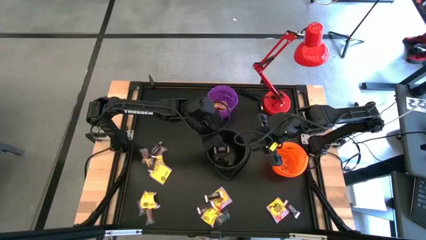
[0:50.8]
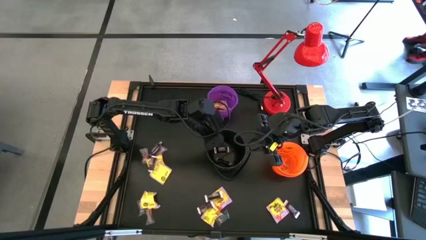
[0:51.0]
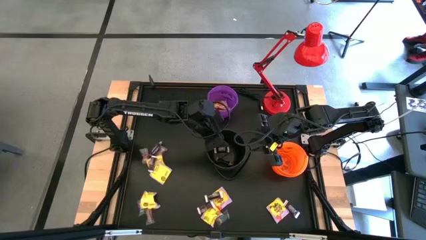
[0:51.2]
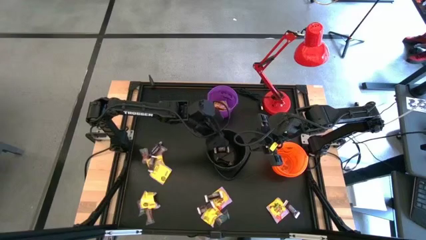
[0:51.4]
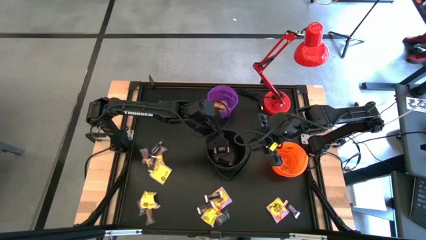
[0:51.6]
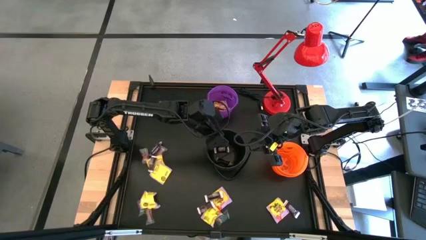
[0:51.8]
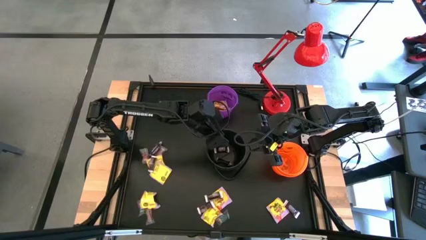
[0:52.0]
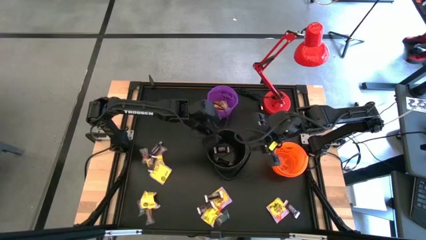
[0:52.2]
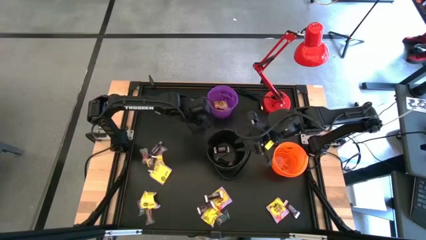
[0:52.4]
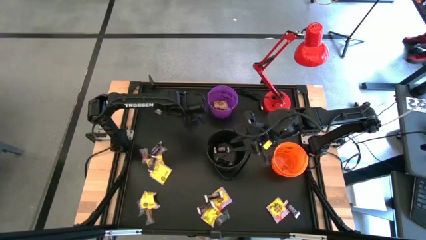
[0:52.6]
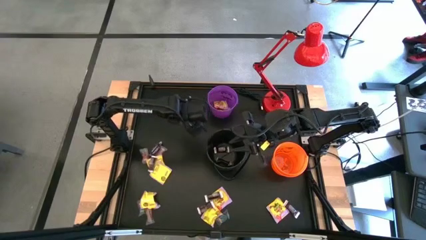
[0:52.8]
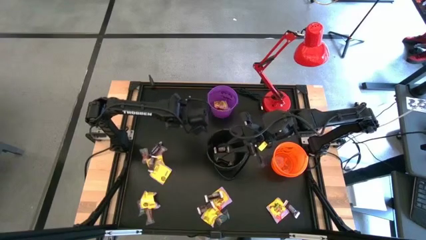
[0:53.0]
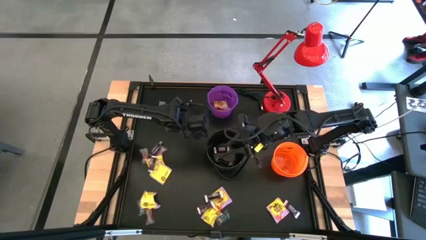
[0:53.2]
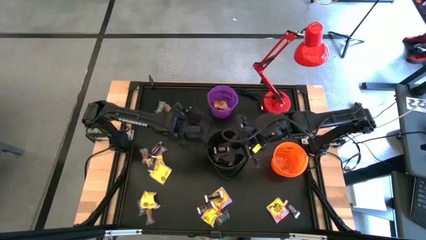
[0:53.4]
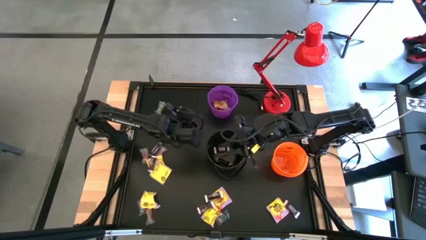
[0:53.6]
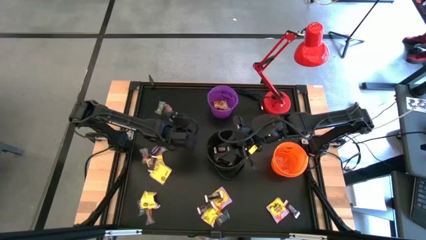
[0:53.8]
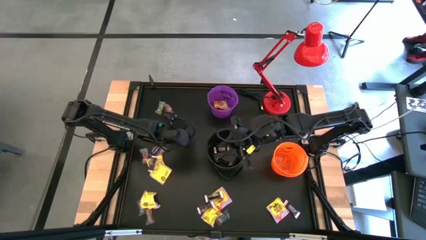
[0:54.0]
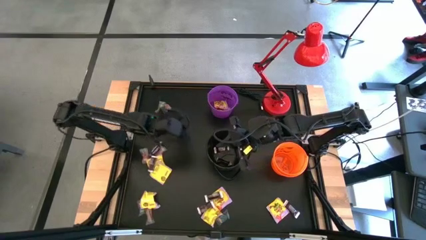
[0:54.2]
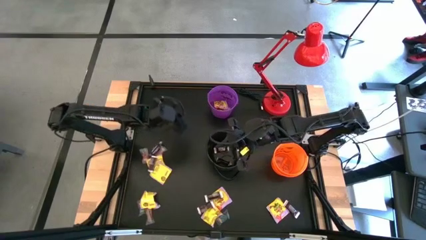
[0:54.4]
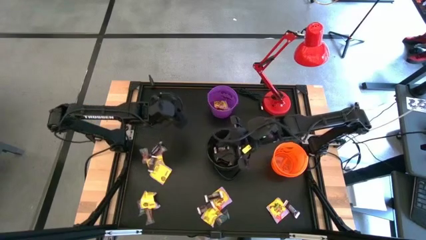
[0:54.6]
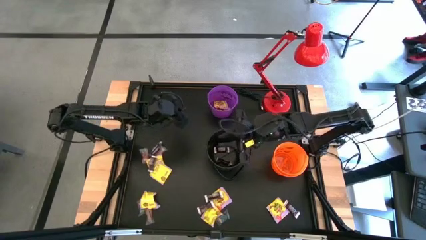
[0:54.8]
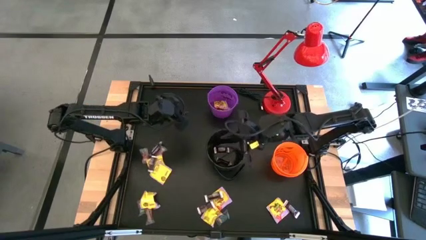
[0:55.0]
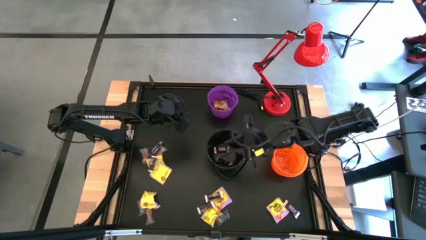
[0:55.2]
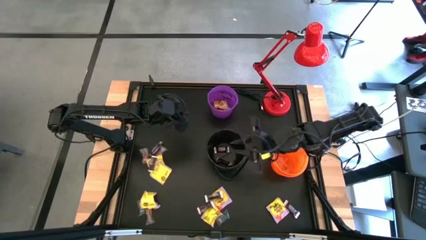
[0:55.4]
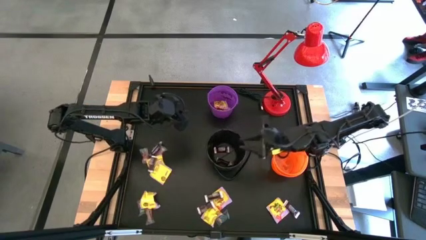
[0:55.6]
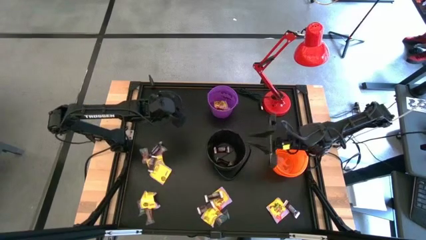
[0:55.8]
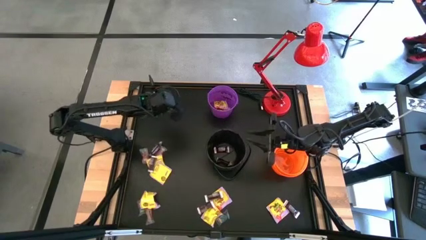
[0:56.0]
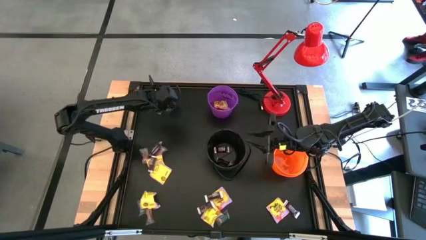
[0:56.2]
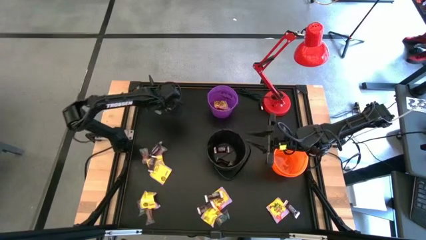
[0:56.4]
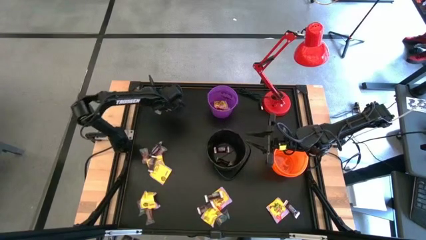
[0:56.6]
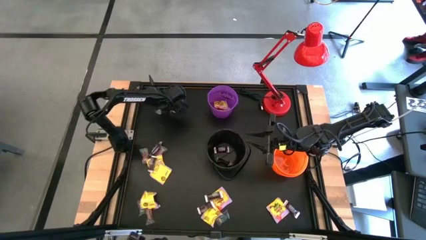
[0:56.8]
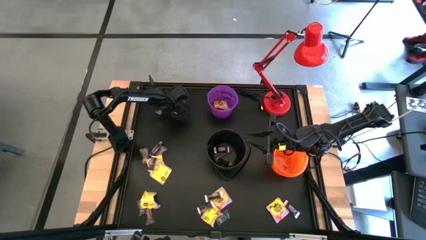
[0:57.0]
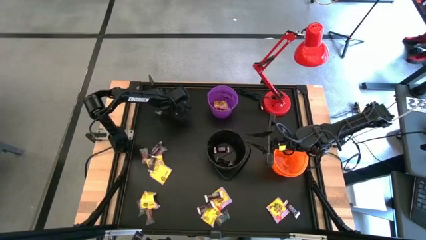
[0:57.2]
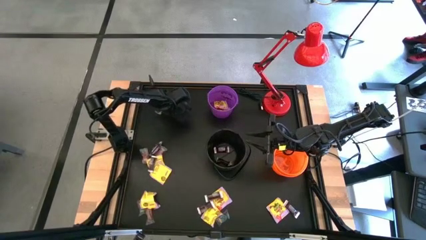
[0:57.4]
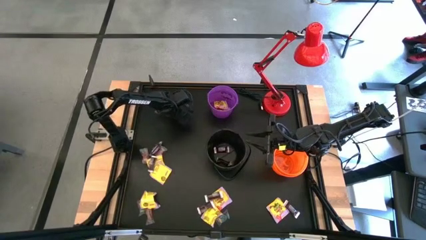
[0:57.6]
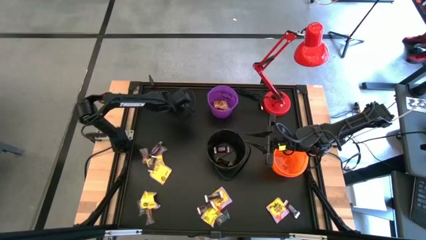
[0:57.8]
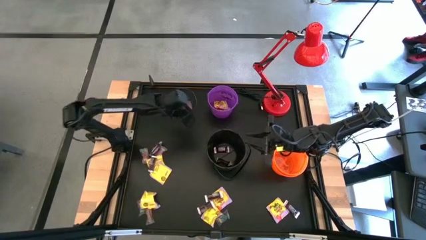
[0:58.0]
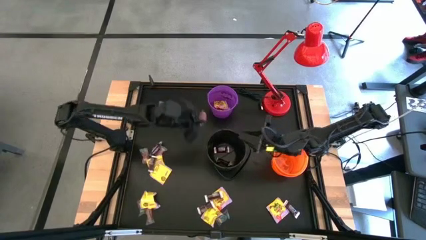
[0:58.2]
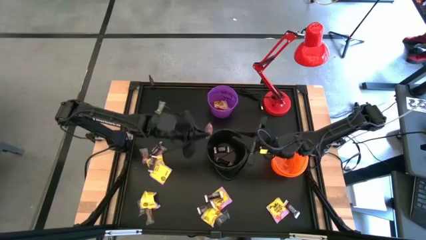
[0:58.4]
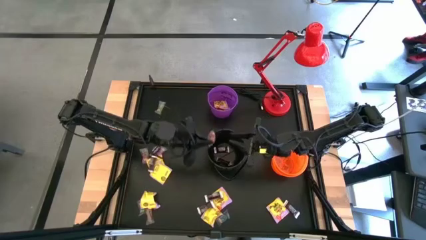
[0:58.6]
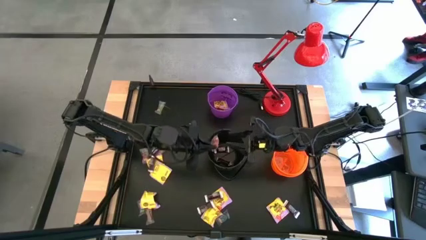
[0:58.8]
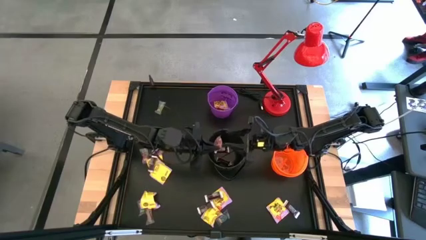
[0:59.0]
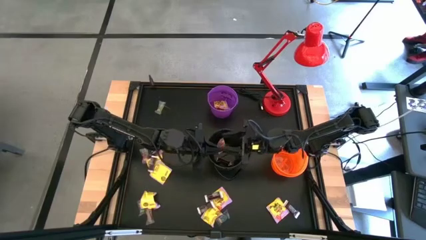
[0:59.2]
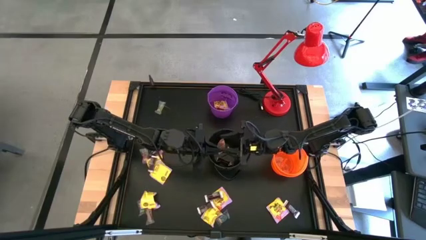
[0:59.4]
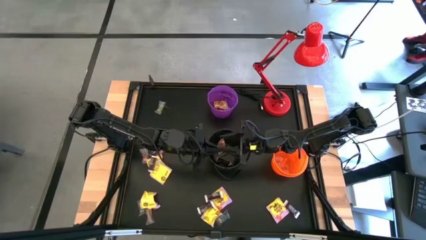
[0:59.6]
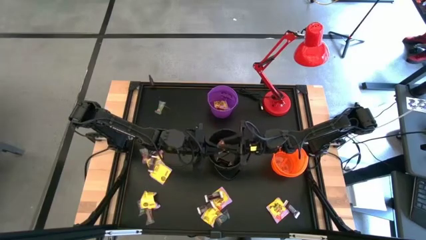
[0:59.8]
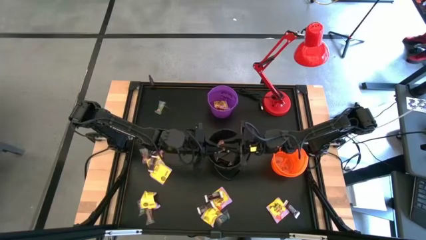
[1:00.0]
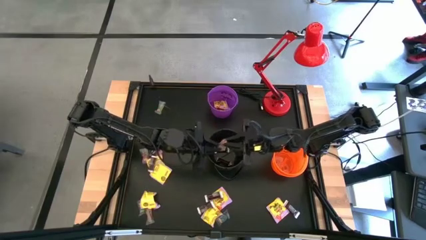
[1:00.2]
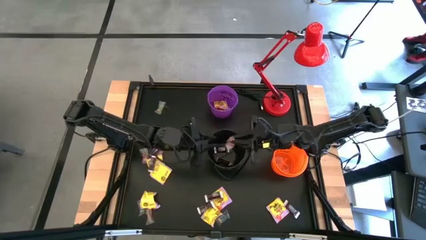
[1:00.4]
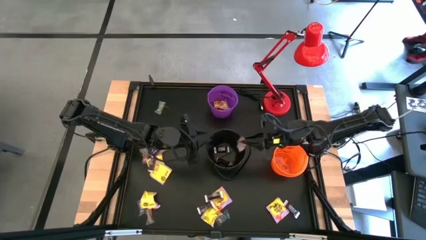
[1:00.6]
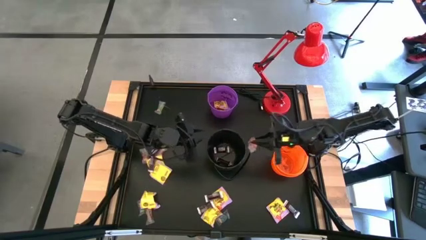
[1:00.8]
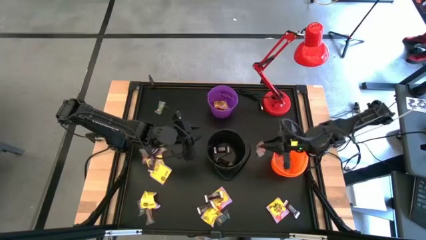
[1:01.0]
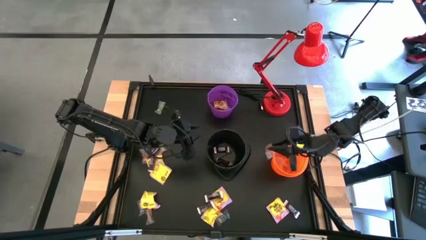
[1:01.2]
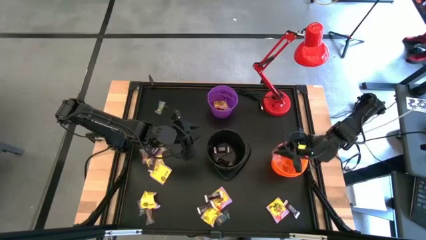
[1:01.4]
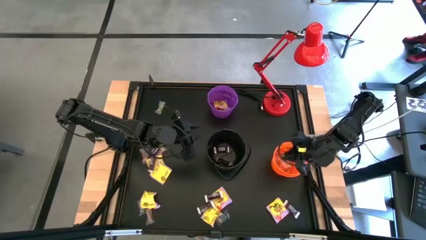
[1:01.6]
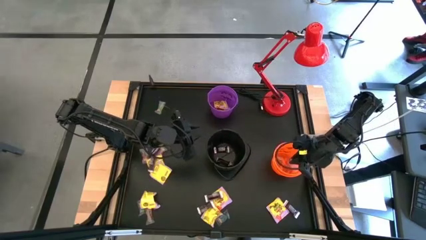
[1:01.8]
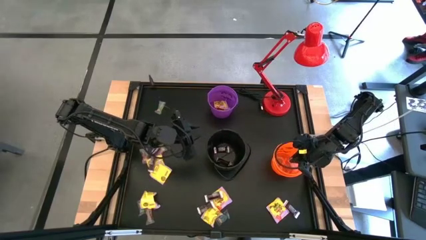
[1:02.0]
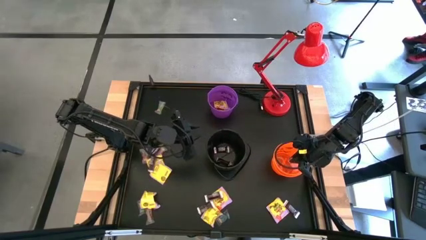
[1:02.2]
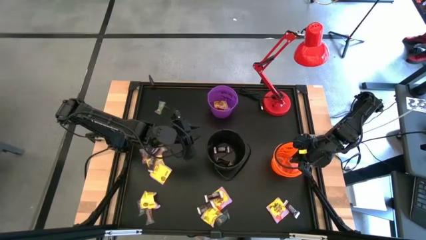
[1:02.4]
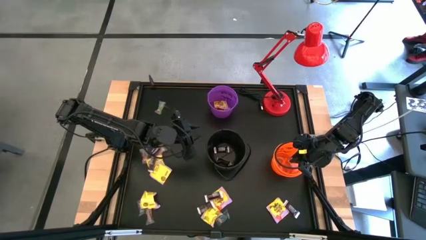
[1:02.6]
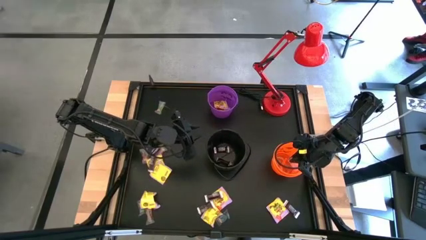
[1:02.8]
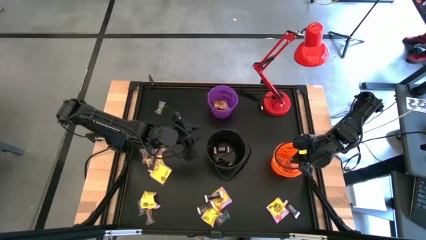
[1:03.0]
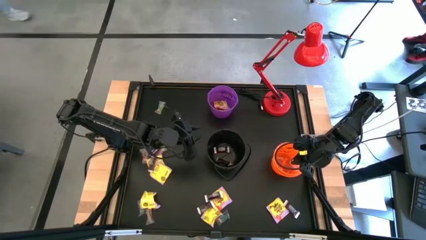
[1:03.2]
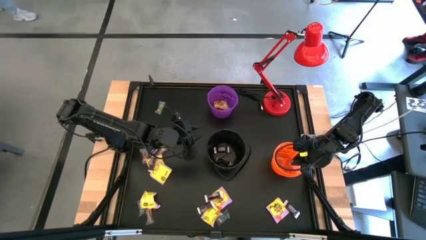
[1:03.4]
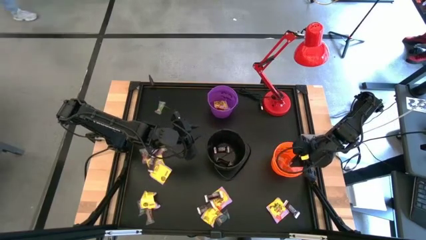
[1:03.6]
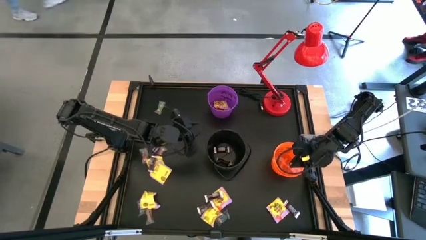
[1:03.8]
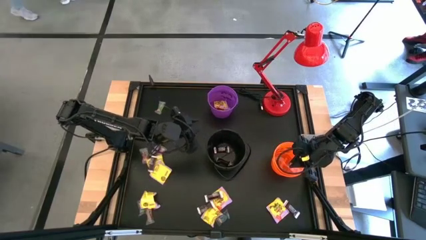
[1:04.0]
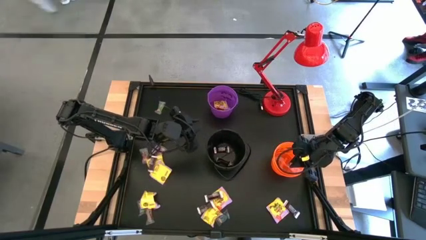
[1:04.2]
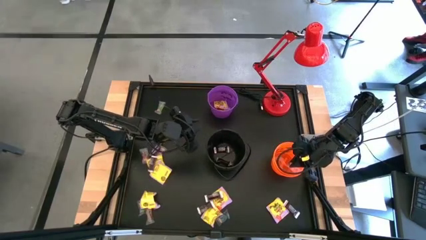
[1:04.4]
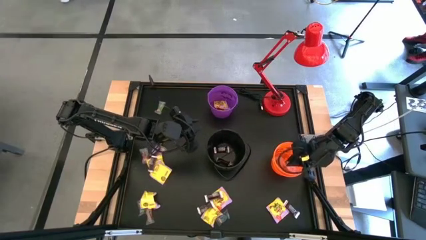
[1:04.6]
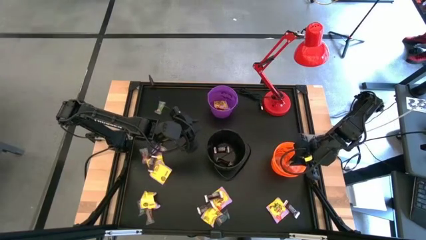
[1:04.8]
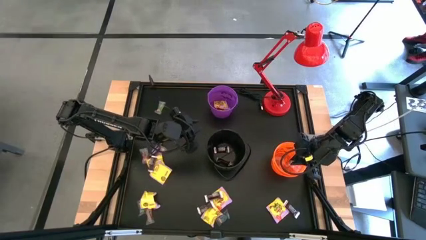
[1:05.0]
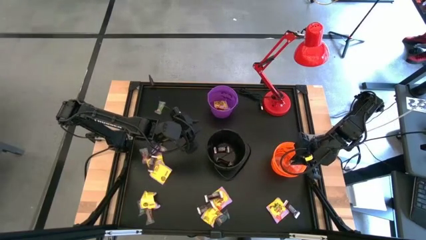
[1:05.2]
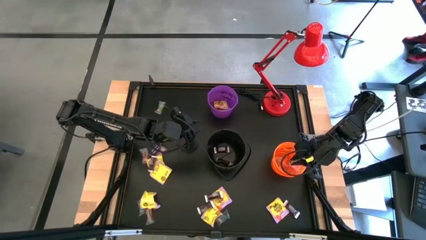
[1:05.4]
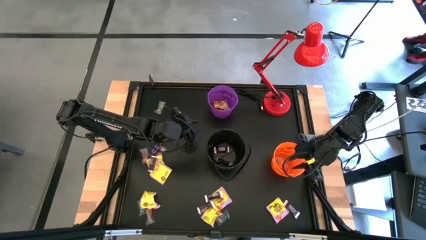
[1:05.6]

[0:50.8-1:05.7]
Task: Sort candy
Put the orange gummy into the orange bucket

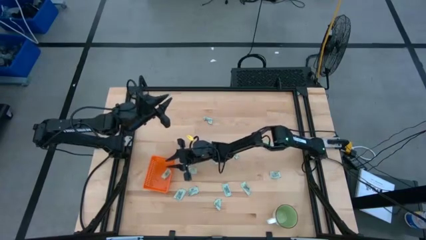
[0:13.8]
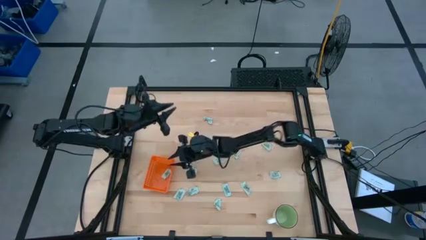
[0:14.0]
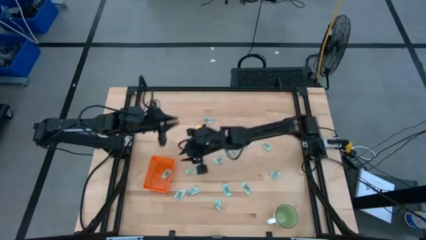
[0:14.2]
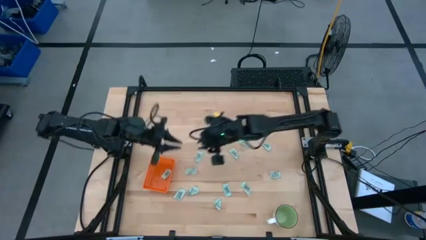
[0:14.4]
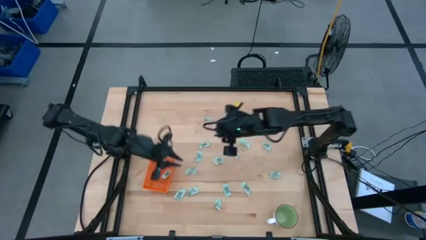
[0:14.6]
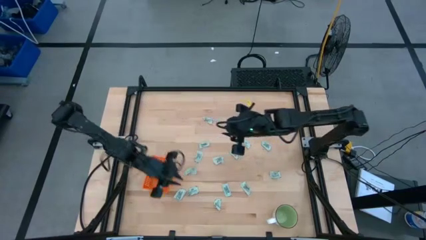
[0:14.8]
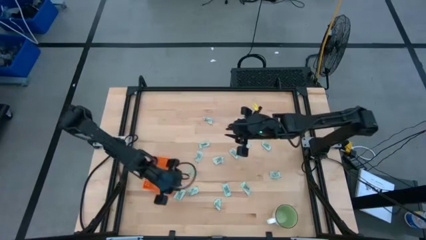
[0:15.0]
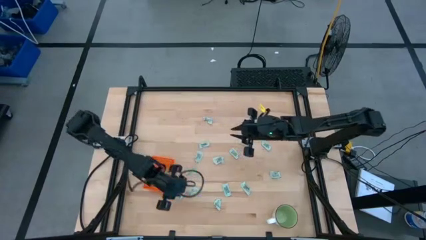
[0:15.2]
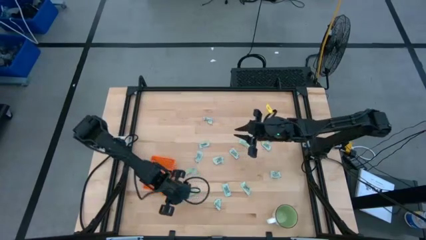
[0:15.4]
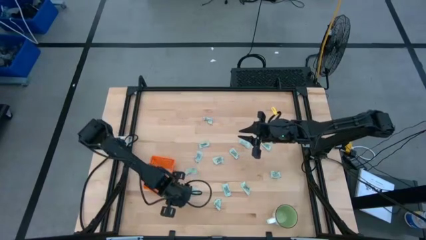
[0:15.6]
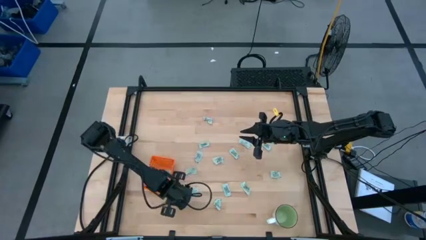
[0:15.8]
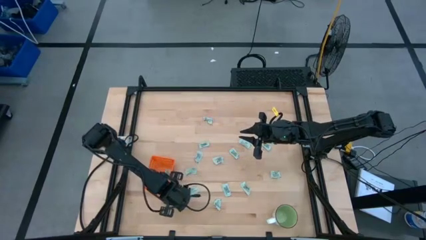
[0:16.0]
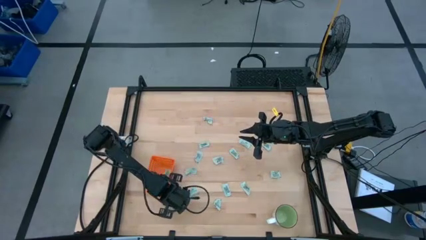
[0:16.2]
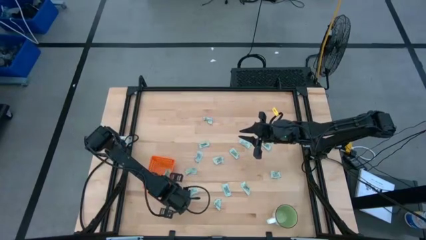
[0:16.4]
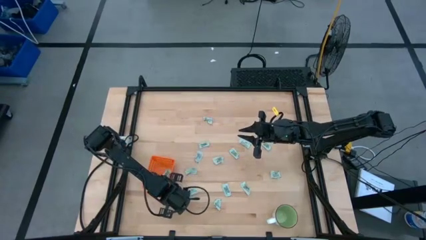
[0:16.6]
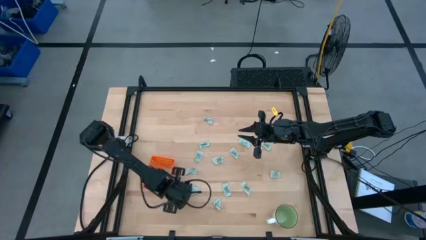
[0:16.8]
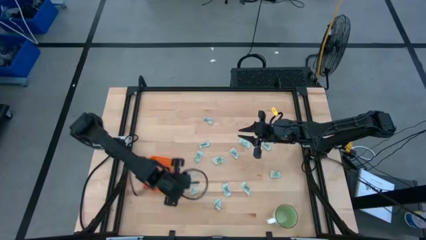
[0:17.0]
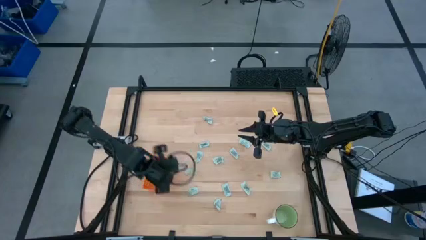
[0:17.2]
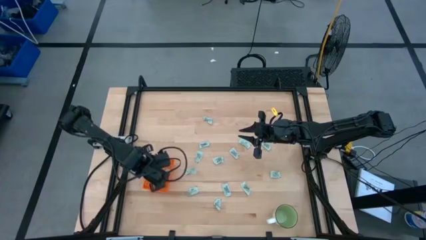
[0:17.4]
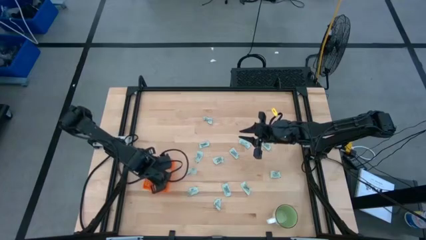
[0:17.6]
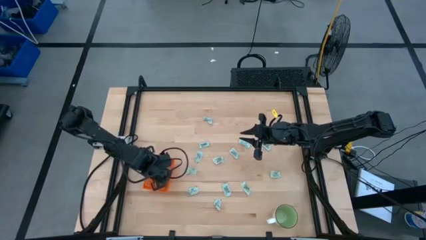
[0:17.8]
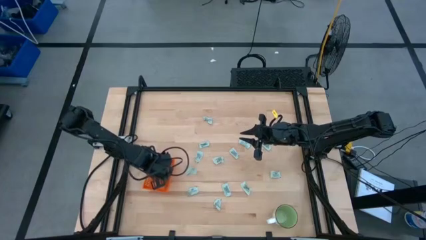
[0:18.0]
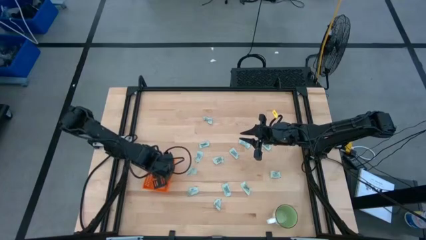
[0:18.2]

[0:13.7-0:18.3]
Task: Pick and place Stevia / Truvia into bins
Put the white stevia packet into the orange bin
